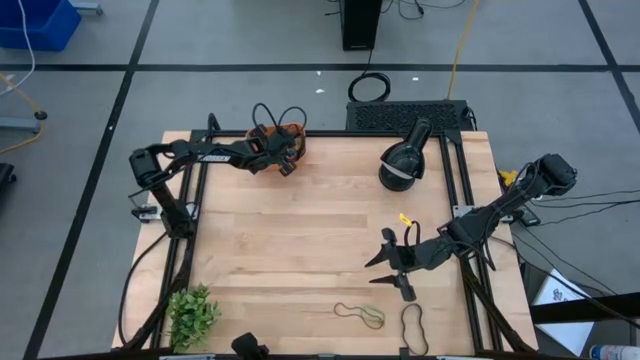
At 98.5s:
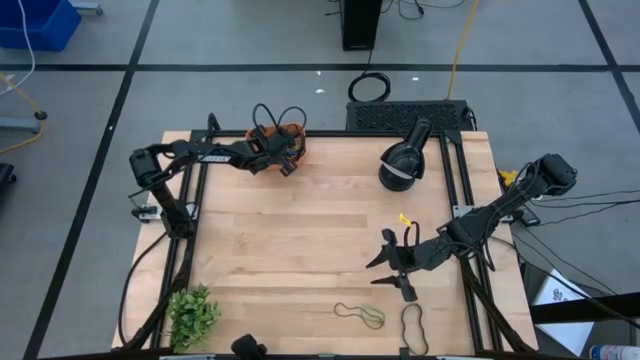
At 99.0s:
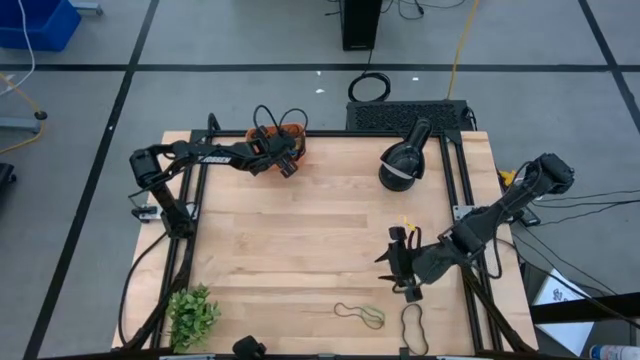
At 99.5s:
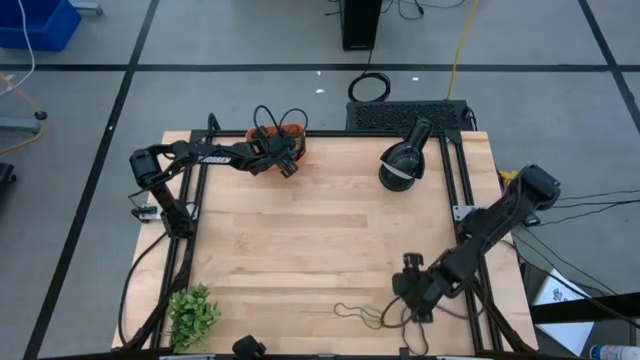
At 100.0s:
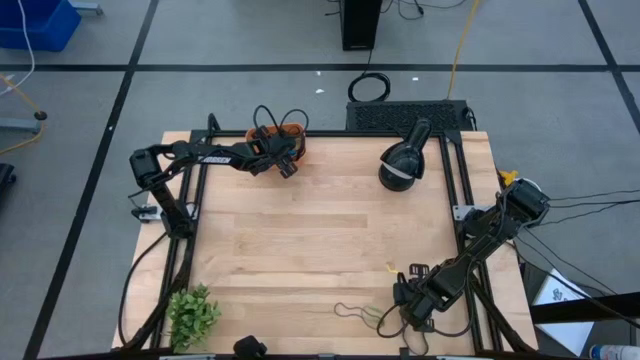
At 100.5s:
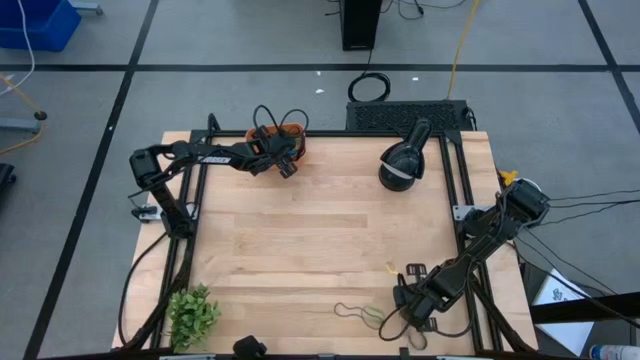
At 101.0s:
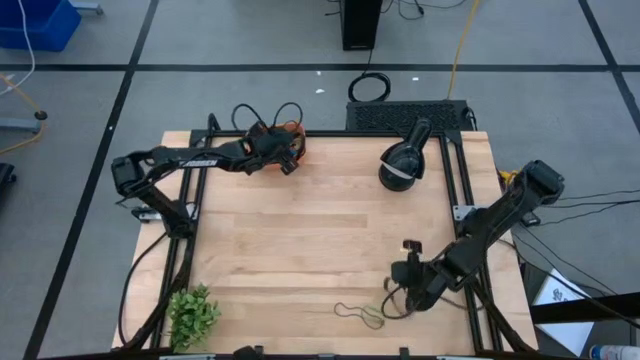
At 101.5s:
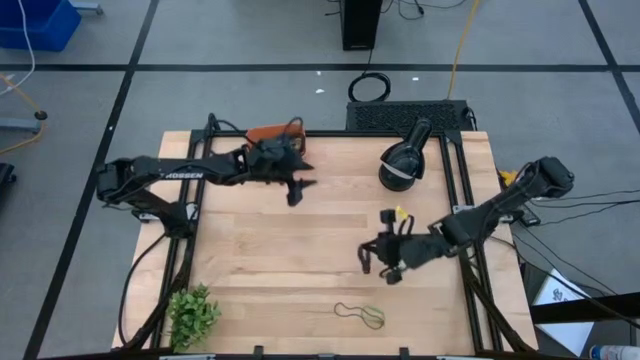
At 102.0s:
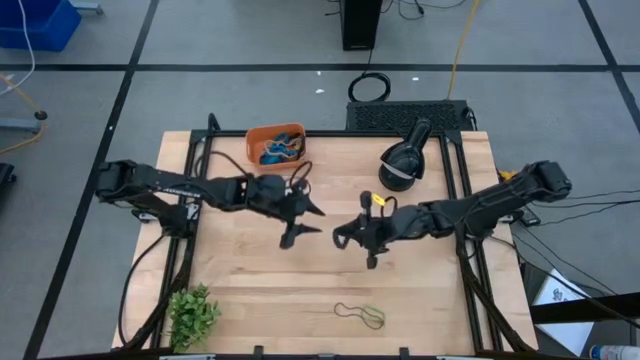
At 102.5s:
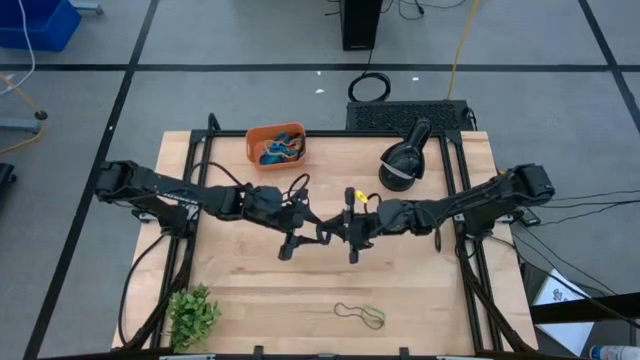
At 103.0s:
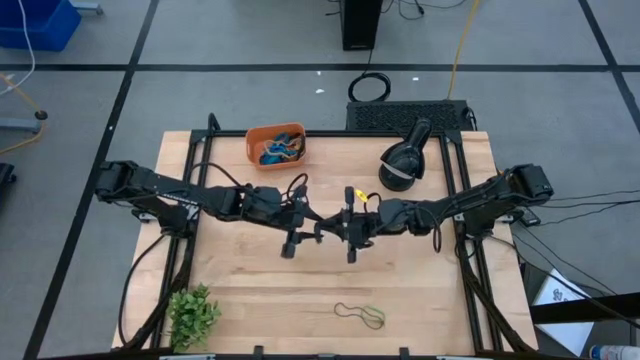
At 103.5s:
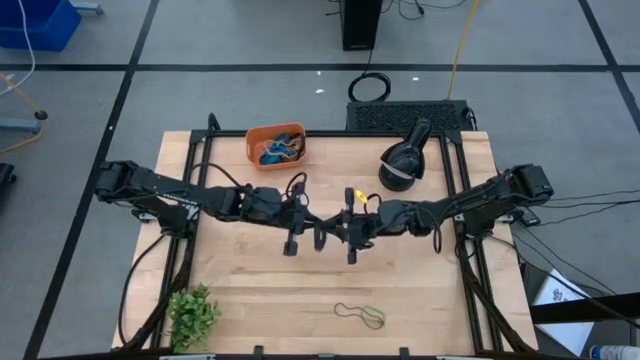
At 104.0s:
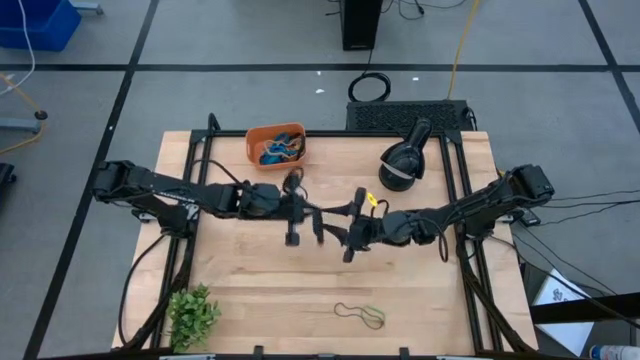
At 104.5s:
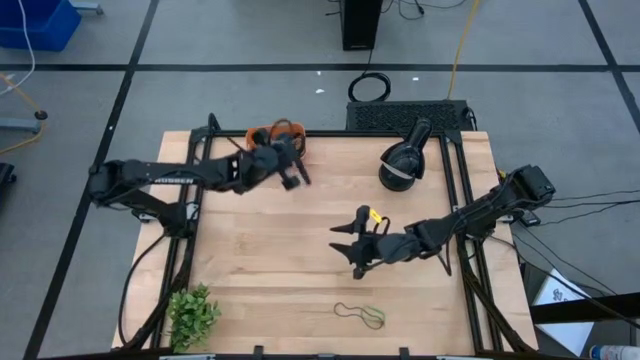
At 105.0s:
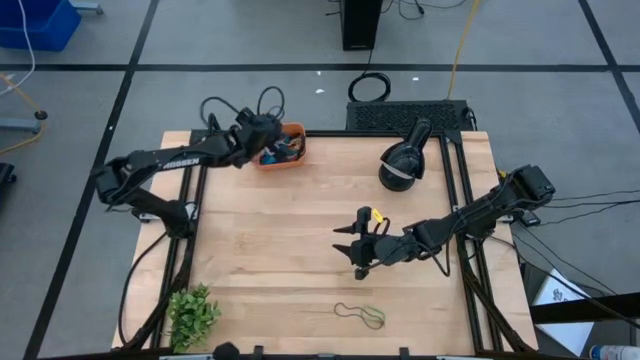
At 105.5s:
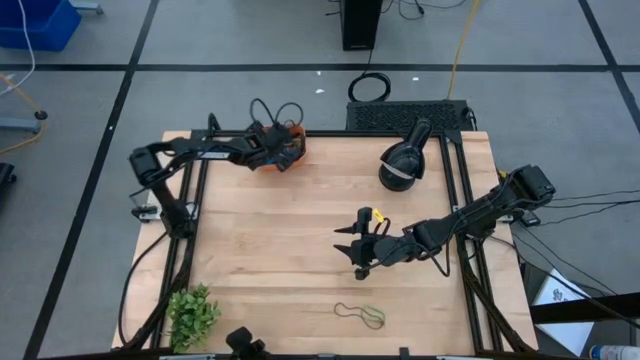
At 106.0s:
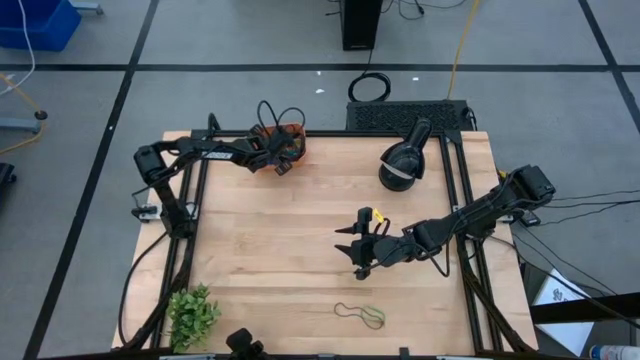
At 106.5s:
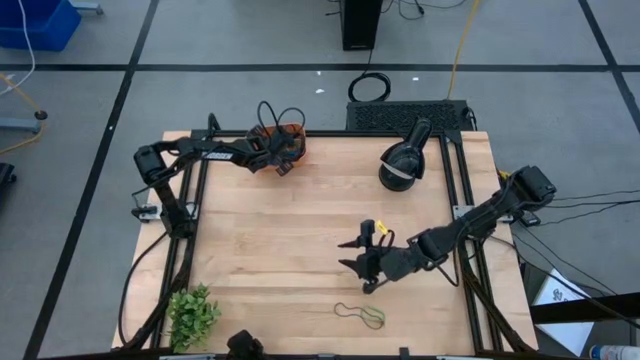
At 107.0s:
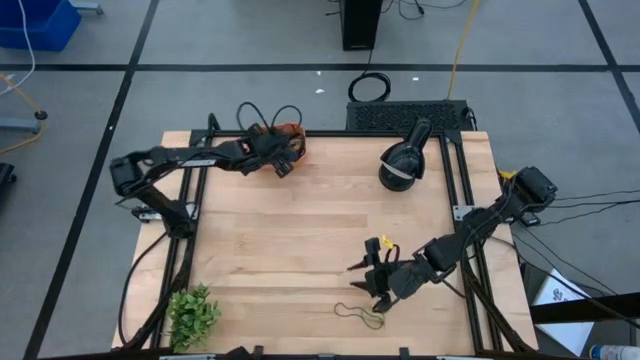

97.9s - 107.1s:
Task: Pick and place rubber bands into bin
Put the black rubber band into the orange container

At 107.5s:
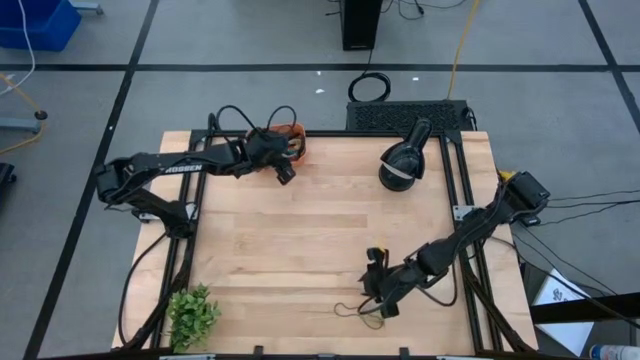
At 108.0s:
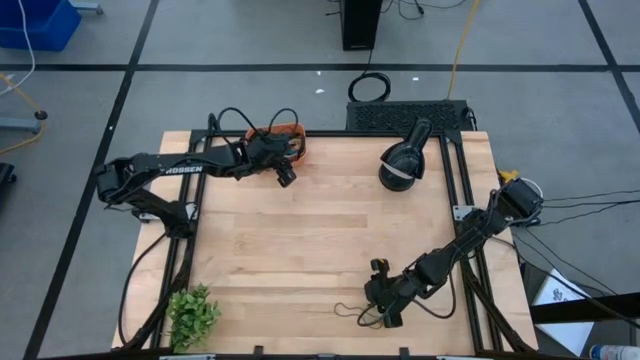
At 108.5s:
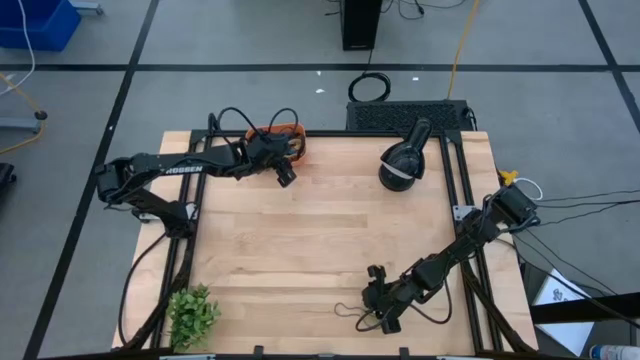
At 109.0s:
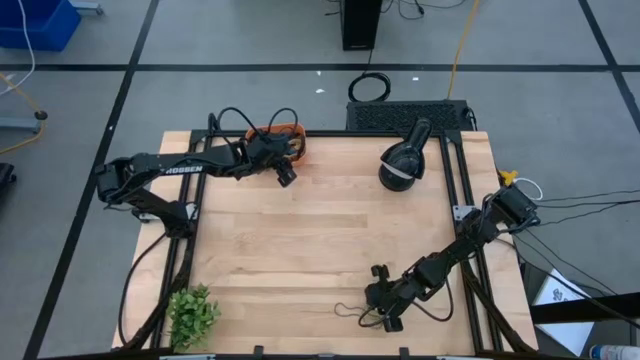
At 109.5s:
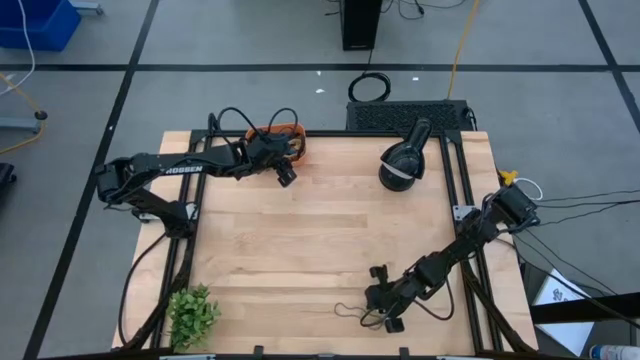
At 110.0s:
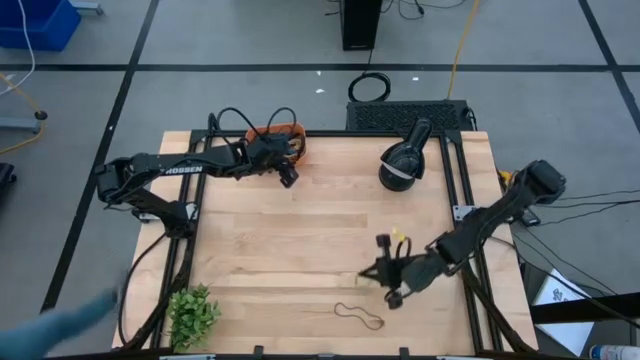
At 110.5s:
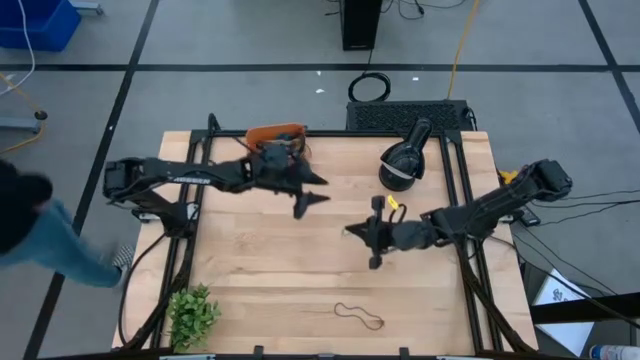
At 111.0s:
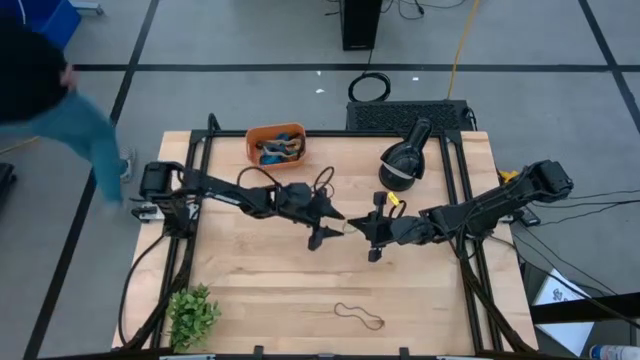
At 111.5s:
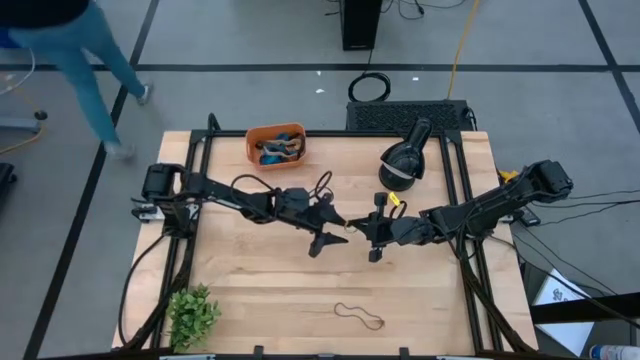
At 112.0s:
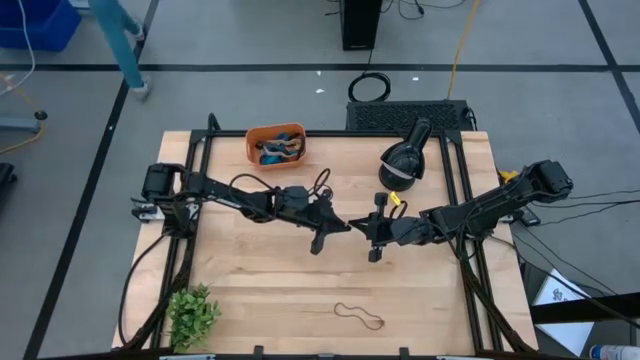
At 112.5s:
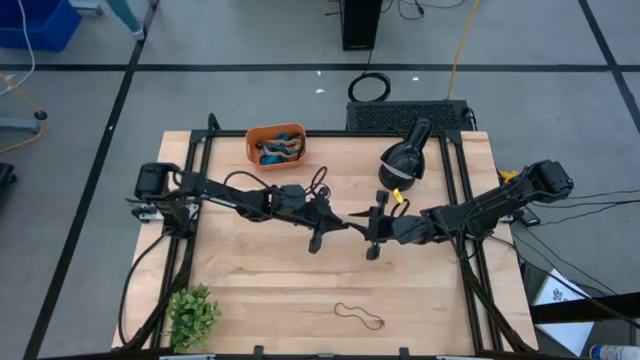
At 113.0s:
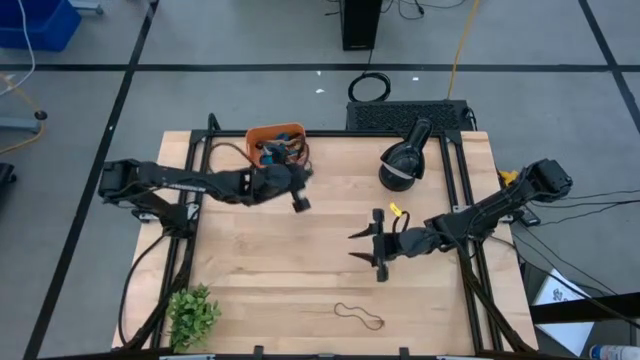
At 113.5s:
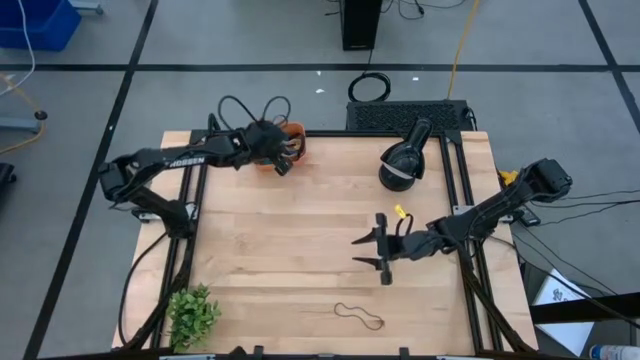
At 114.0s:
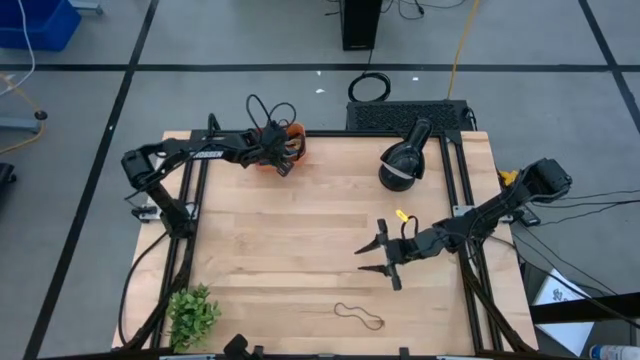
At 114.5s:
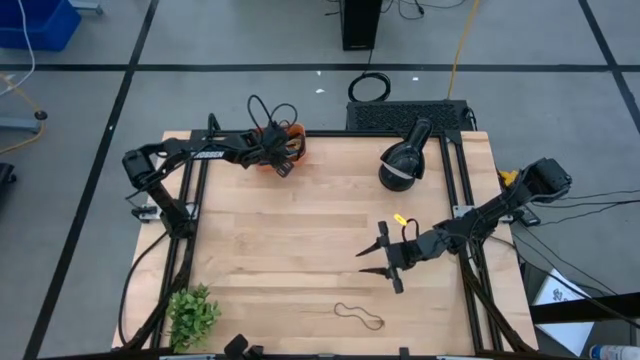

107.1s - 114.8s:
Put the green rubber band into the orange container

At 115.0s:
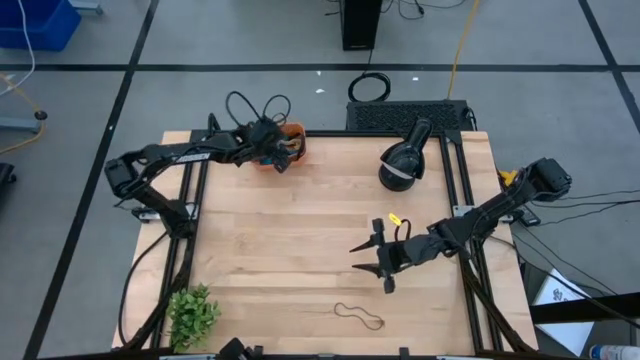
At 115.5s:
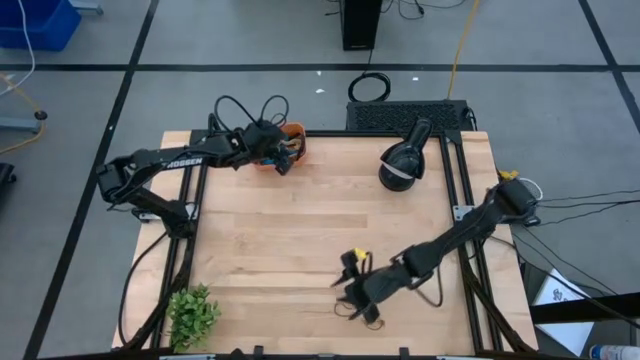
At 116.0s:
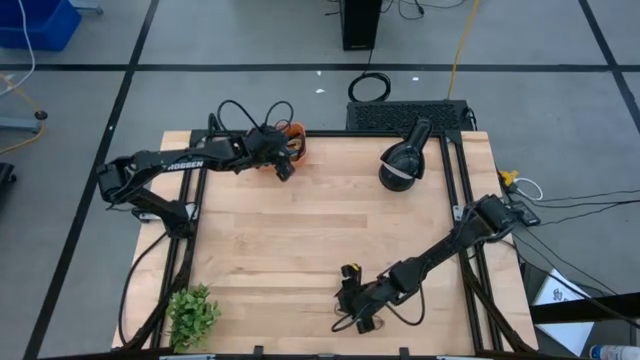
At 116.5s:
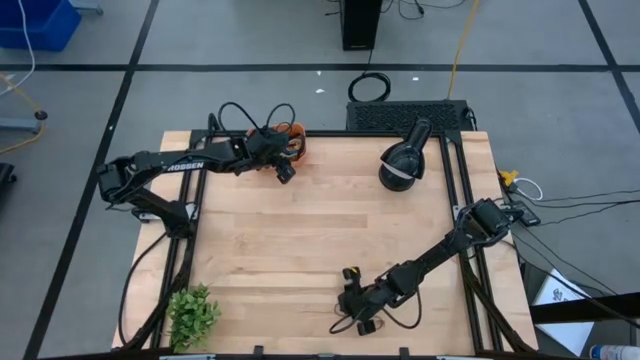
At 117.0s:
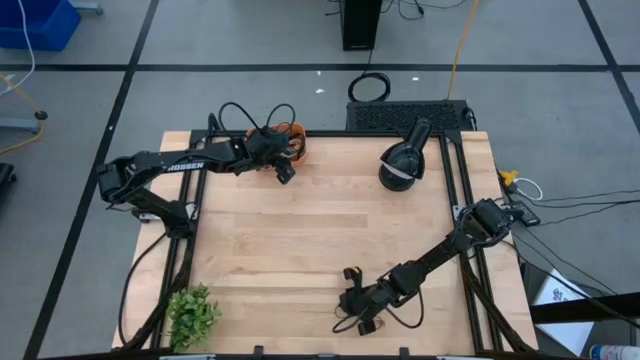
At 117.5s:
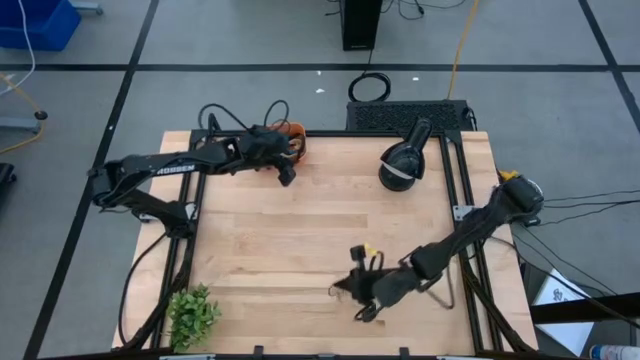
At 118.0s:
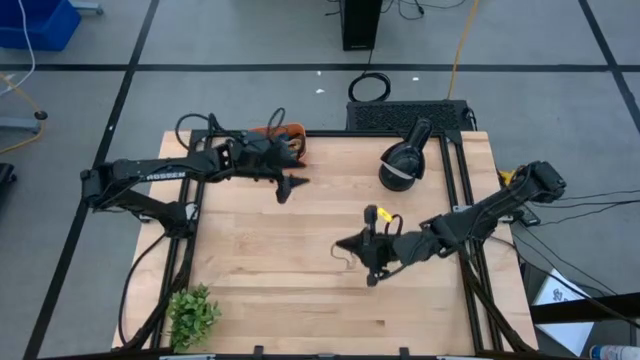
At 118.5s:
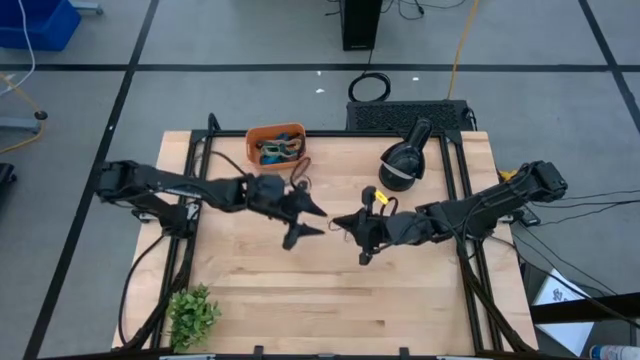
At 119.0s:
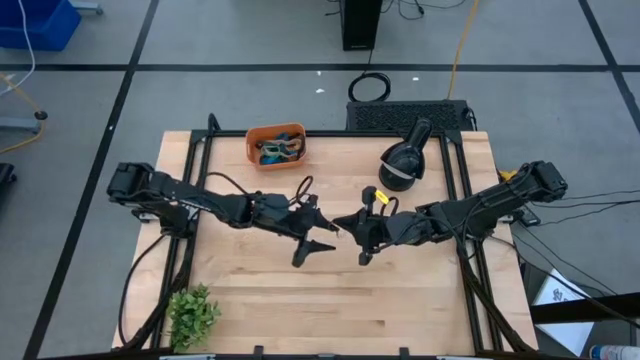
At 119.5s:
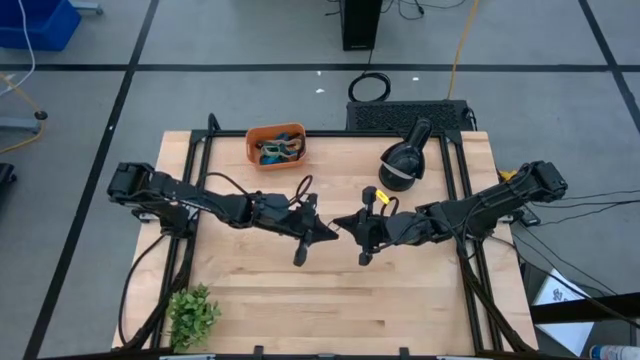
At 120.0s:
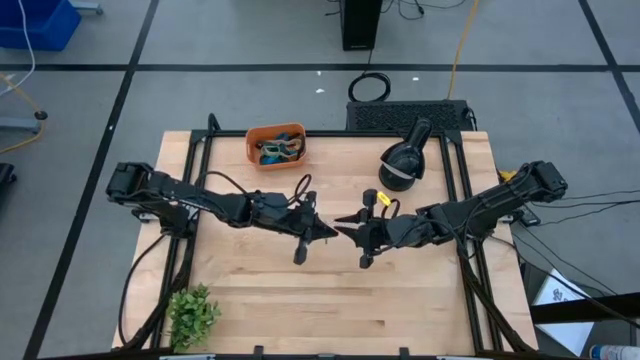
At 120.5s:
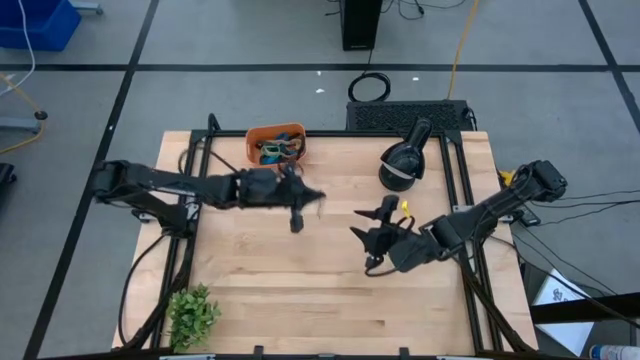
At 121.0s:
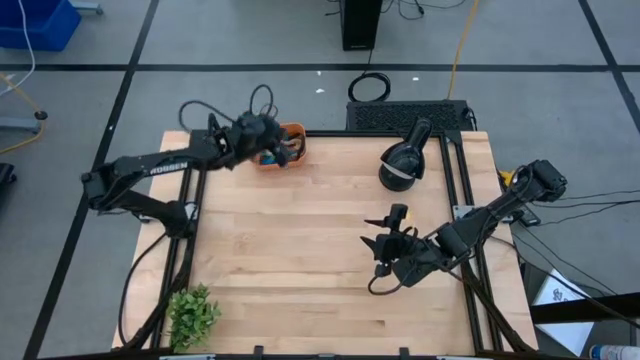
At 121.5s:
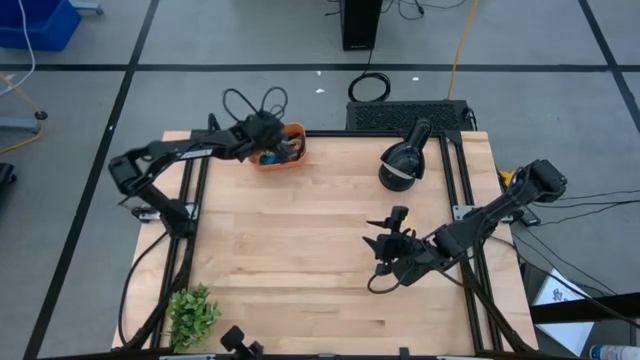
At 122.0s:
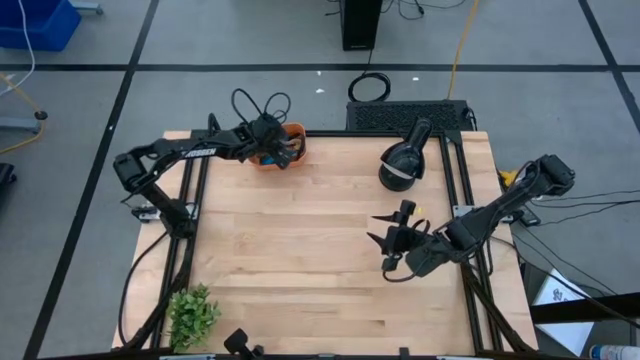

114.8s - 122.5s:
Put the purple rubber band into the orange container
